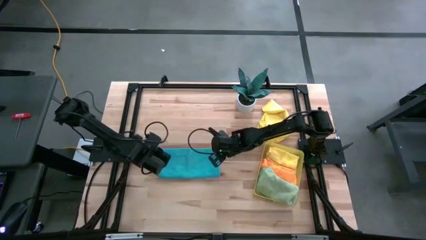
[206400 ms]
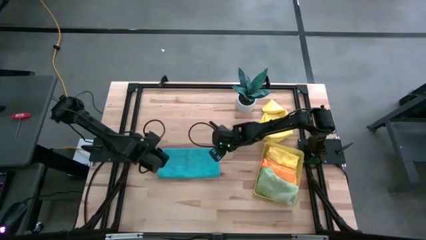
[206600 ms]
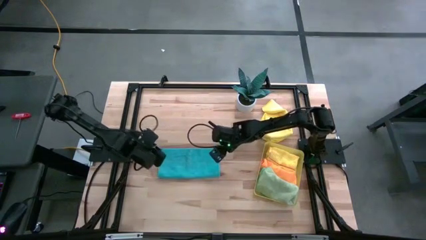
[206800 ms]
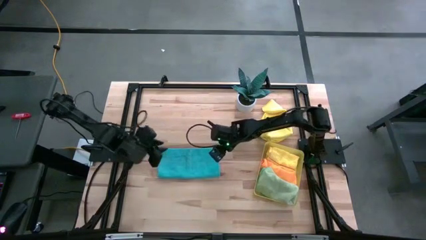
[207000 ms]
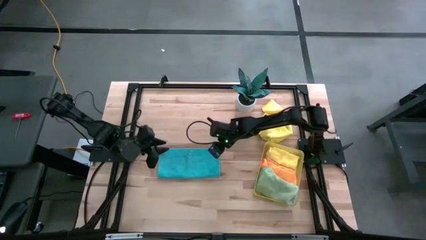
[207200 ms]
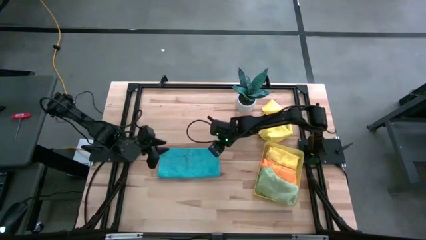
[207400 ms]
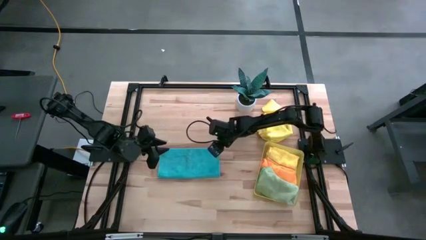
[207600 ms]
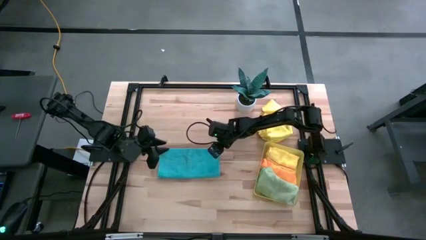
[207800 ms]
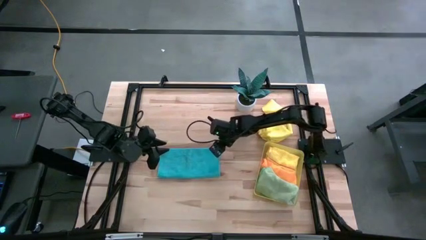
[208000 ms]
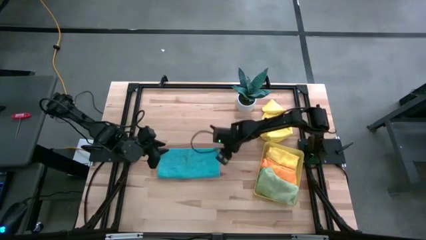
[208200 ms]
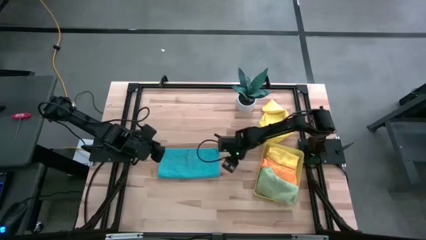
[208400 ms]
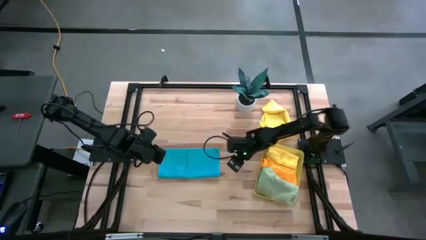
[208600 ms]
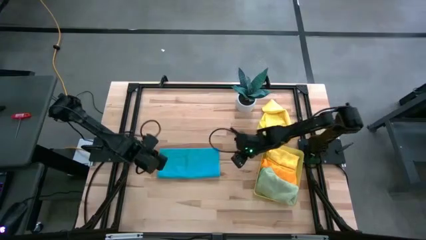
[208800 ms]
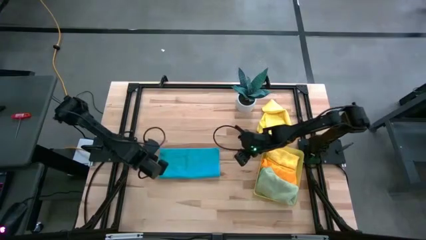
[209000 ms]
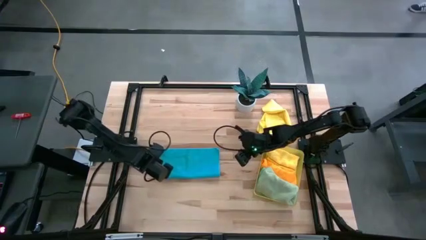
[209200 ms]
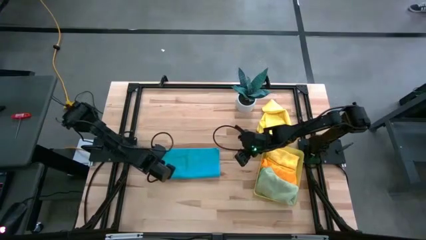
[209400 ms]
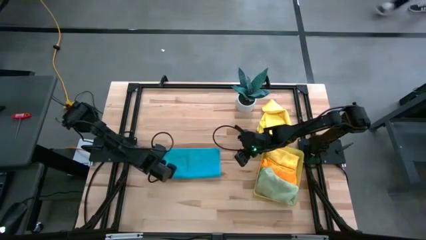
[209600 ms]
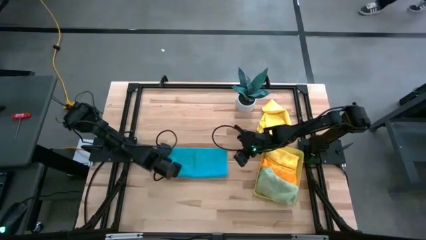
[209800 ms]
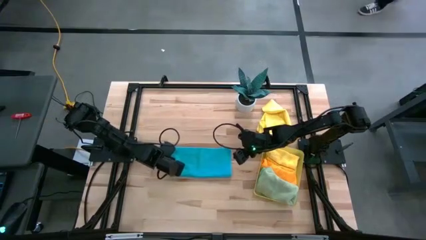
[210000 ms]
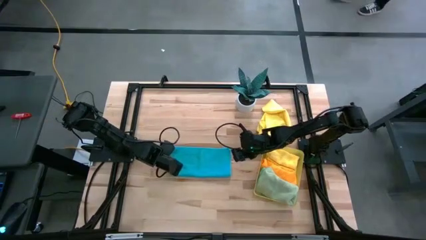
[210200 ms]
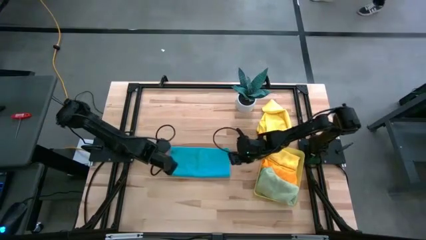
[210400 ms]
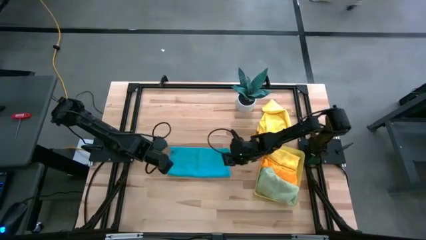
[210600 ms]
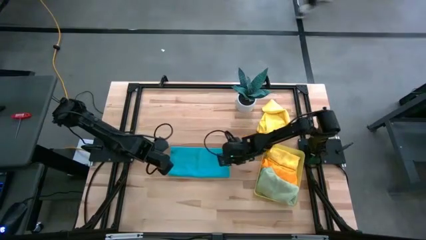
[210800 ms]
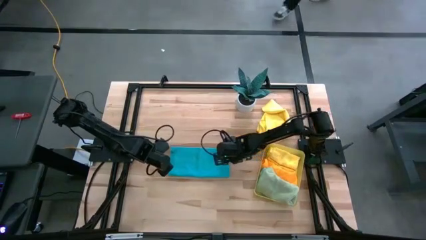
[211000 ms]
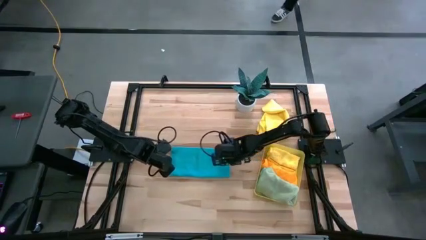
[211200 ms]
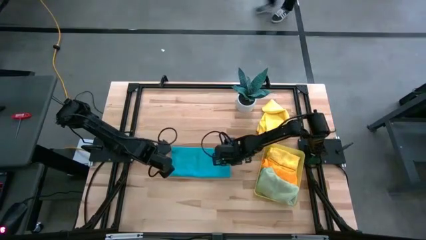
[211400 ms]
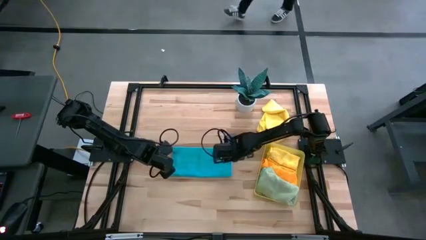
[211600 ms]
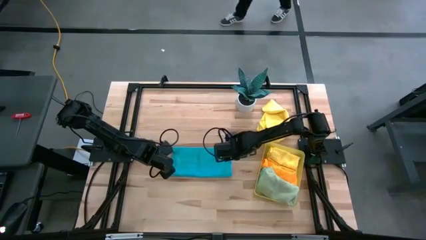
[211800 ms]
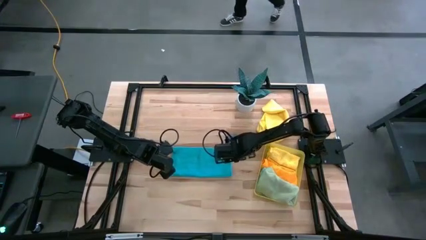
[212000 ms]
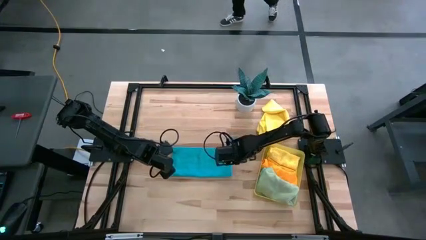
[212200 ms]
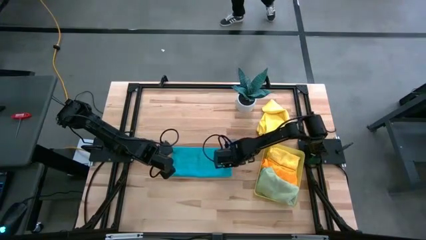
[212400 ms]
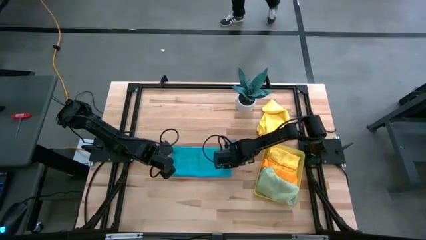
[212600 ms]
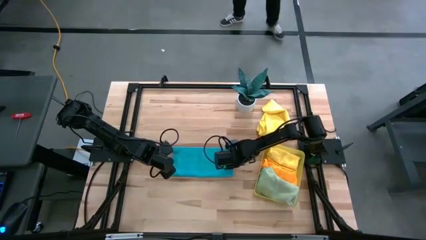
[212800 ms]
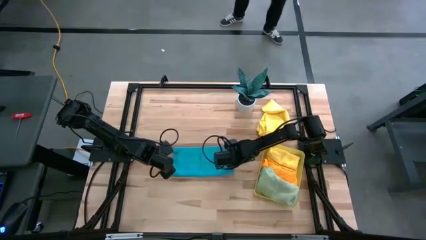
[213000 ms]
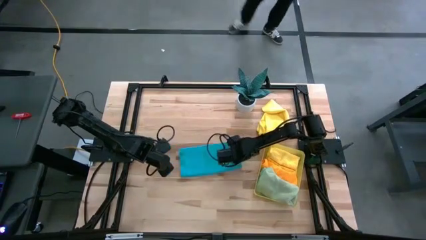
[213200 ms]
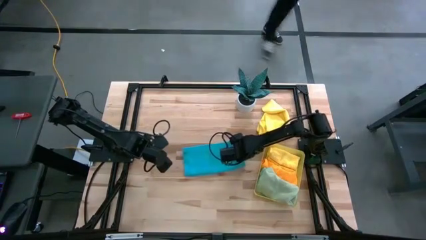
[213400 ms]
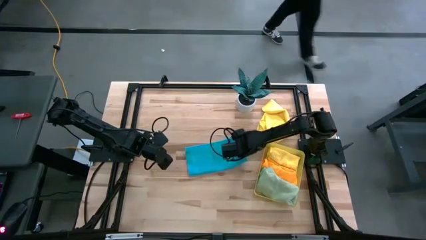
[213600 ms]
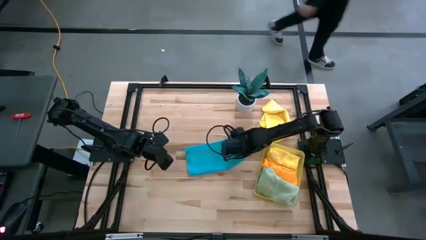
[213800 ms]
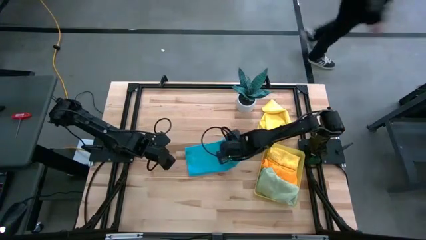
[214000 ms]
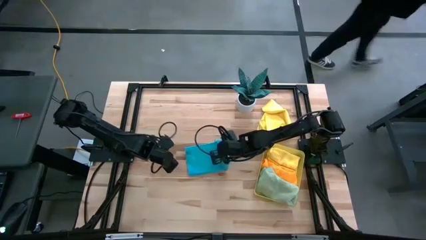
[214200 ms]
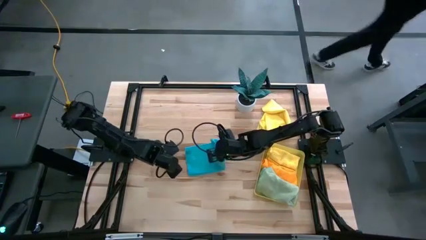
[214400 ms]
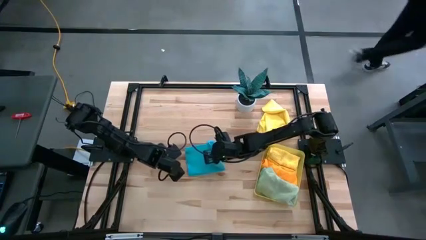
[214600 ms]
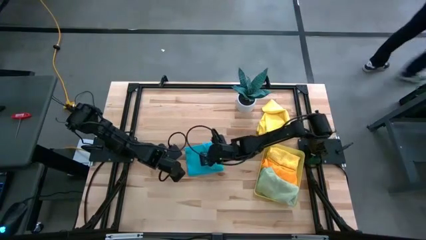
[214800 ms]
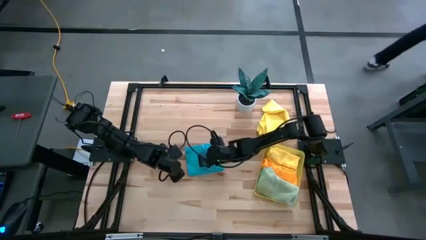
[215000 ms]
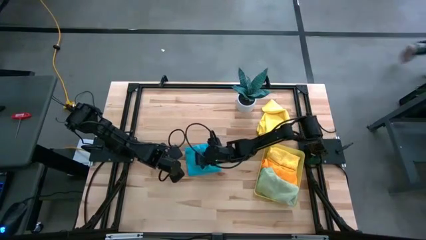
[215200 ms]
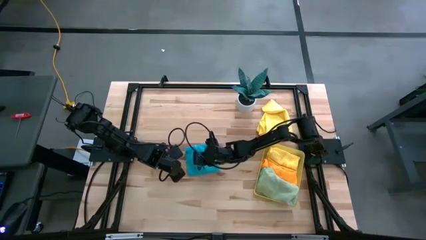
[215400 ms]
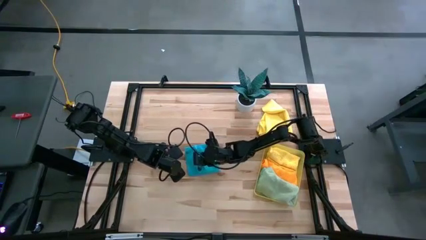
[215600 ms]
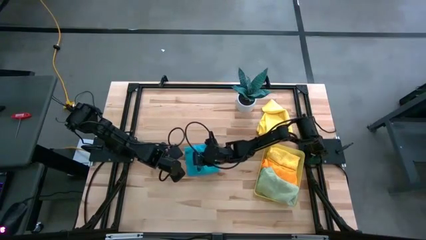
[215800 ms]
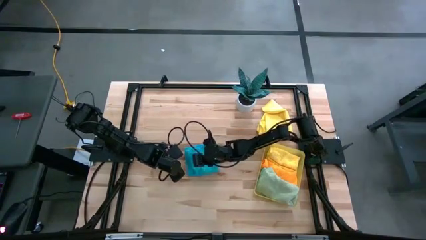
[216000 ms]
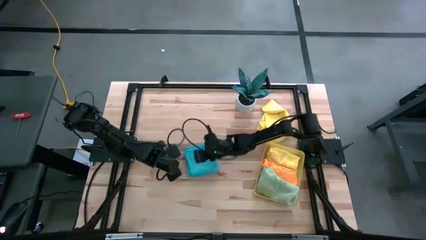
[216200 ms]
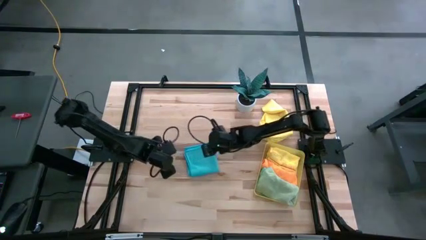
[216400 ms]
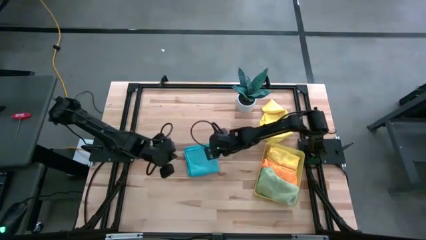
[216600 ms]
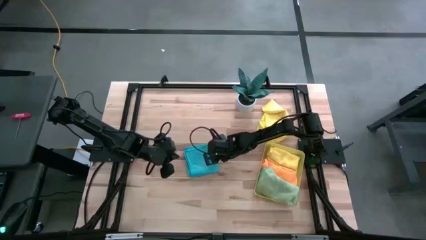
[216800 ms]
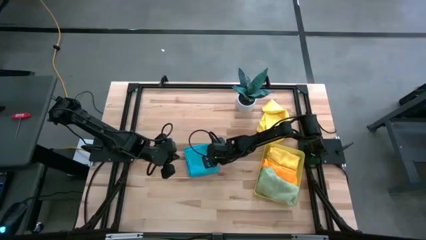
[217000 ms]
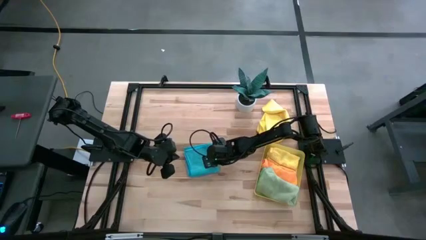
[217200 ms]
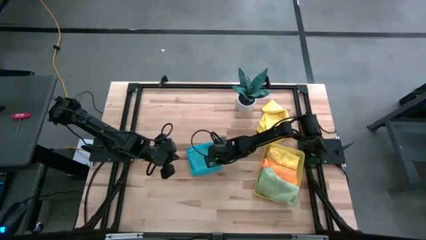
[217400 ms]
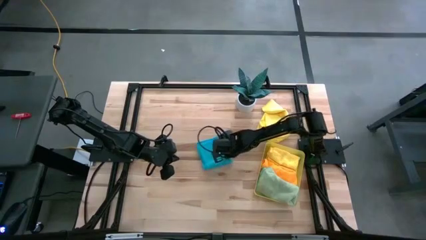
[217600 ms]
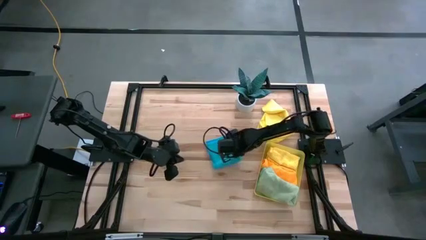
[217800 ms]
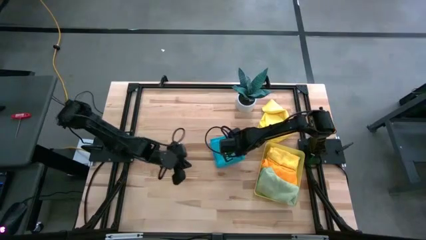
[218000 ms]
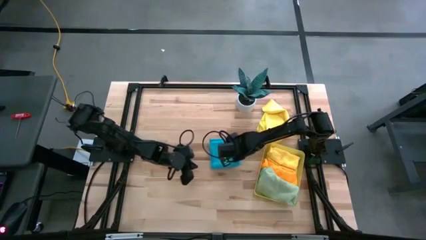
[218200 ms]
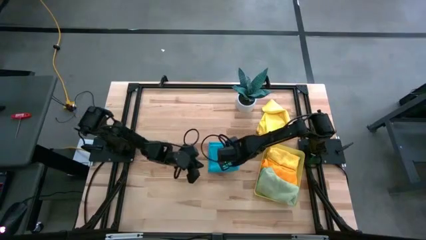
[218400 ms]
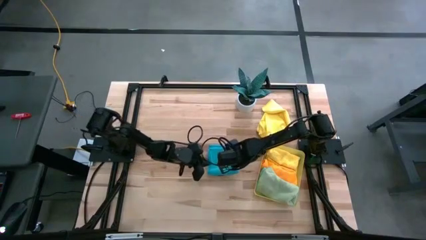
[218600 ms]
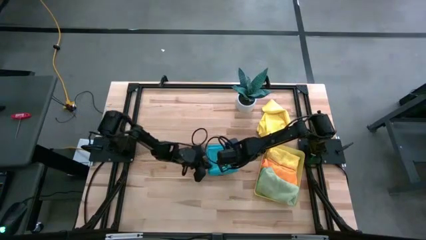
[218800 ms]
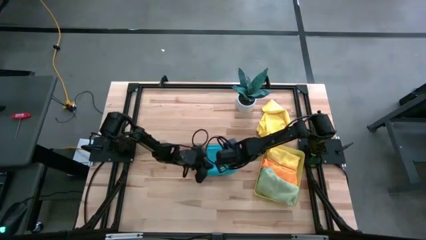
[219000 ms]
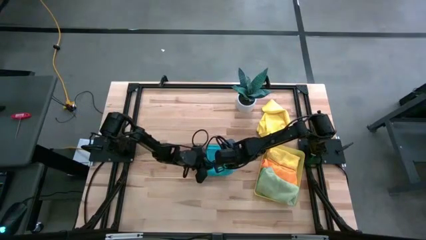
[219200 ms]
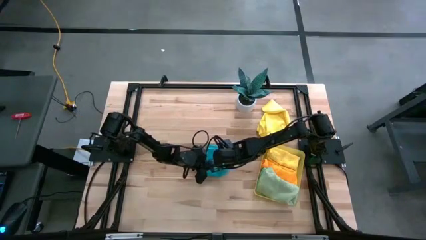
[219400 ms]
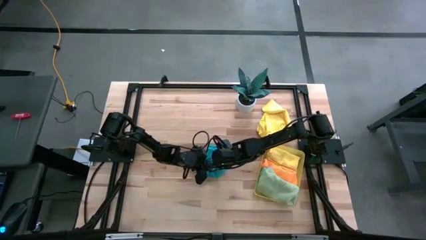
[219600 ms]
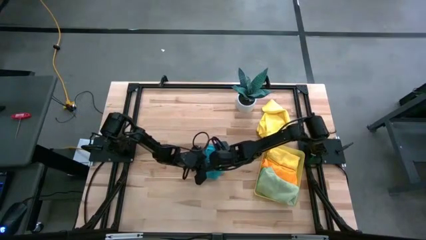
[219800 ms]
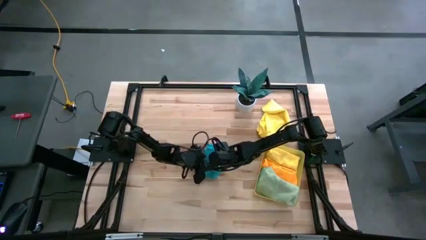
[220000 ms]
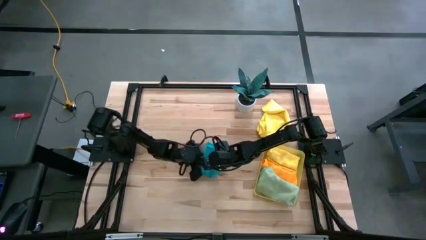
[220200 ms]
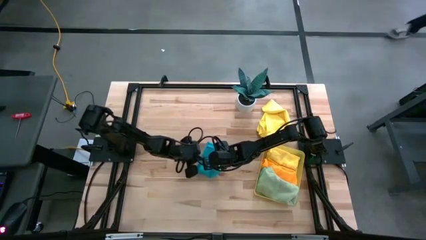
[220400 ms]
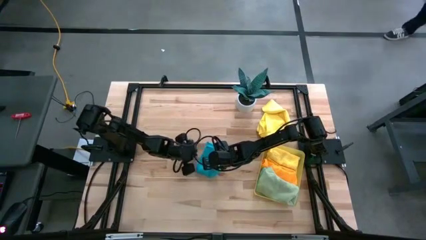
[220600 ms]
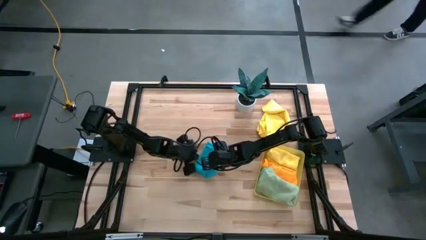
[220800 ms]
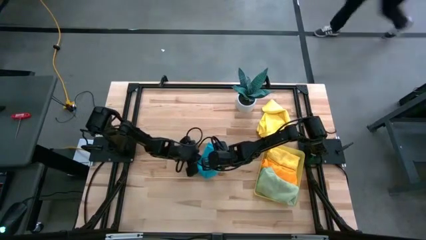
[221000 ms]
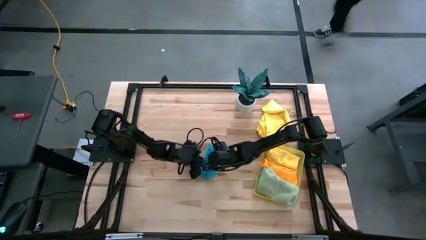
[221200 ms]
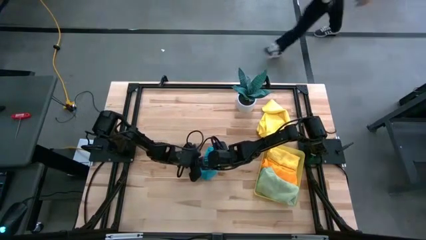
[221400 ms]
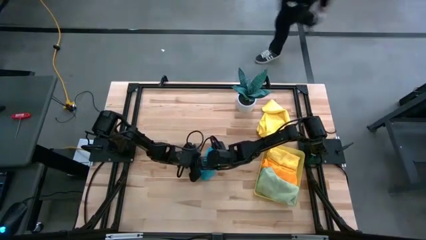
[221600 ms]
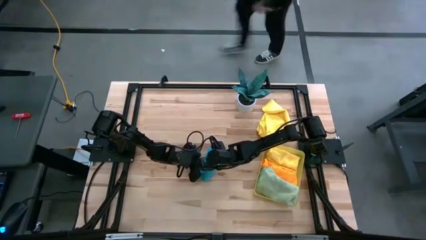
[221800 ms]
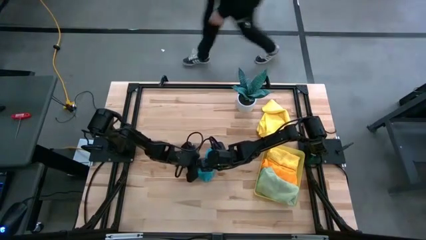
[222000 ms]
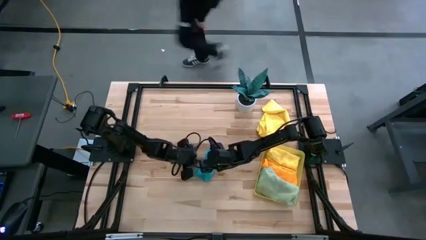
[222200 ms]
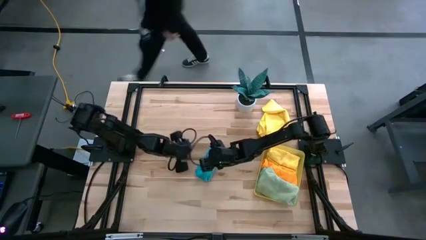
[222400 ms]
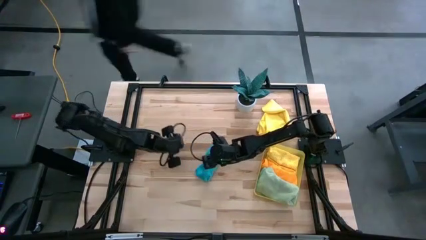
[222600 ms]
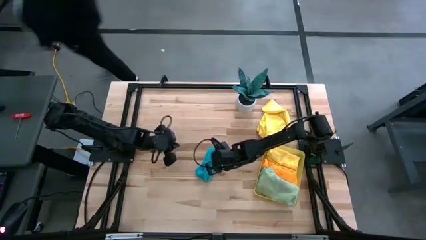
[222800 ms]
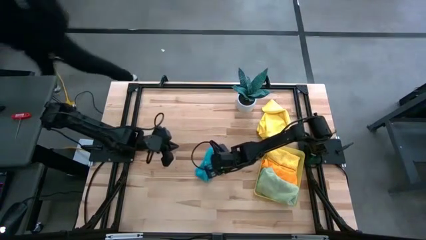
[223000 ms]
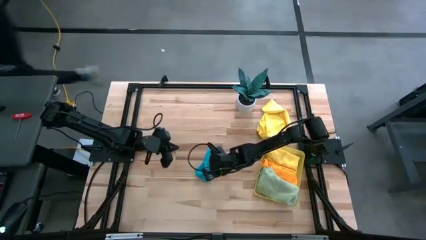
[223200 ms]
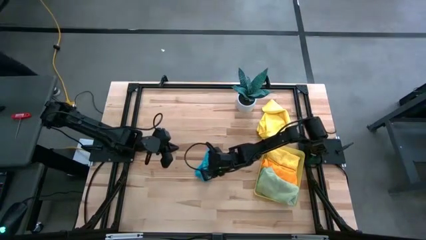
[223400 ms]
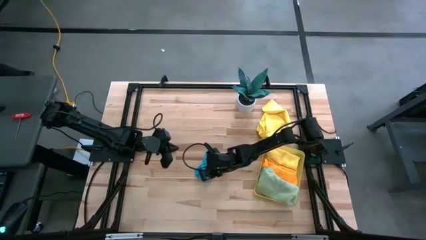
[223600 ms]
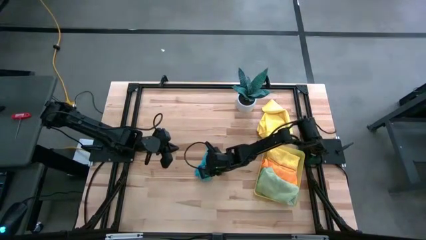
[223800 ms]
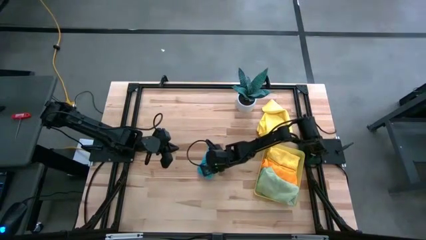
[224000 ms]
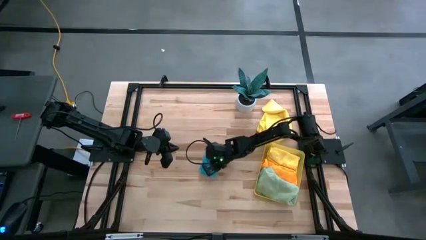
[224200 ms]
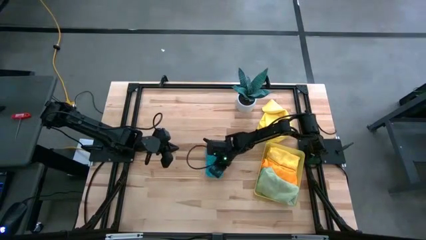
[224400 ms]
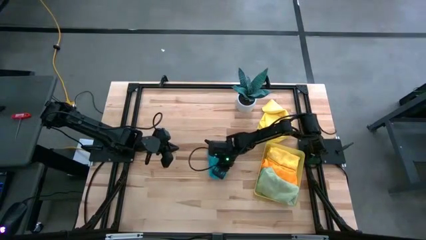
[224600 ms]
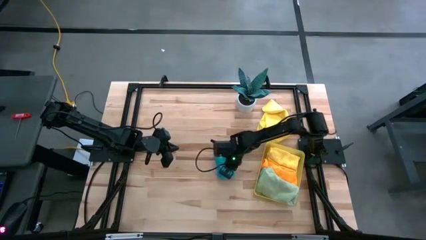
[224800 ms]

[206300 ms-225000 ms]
Task: Fold microfiber towels
Fold the blue microfiber cloth
